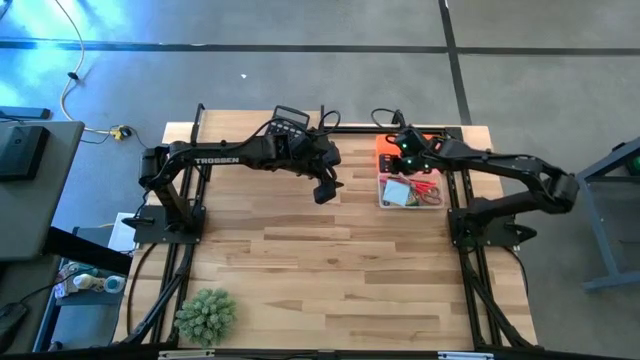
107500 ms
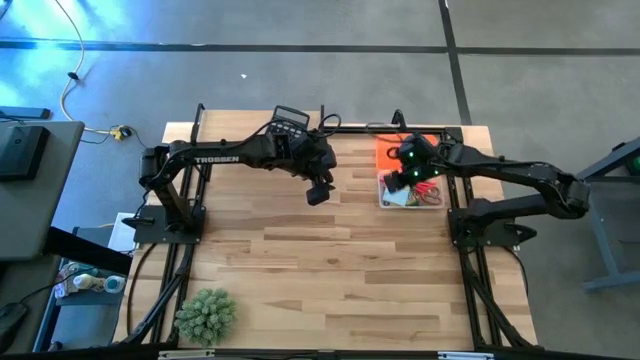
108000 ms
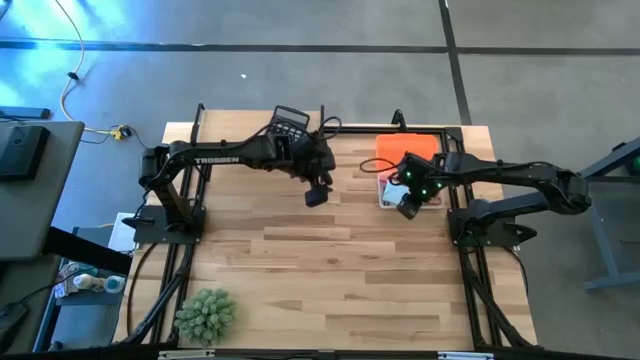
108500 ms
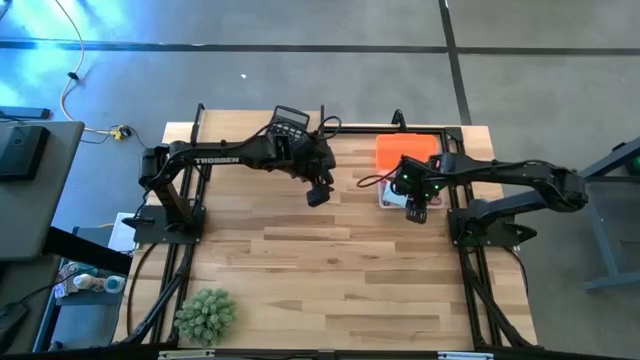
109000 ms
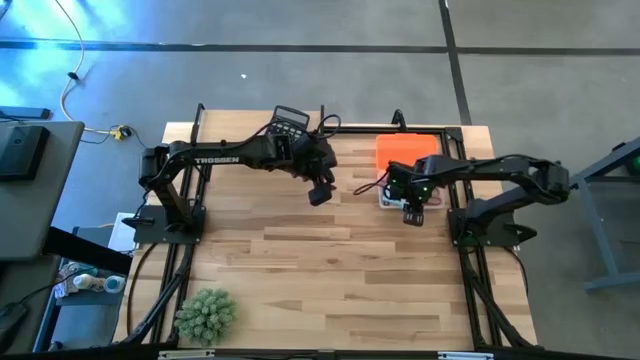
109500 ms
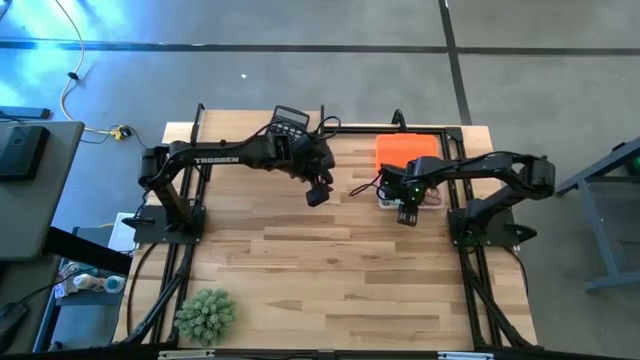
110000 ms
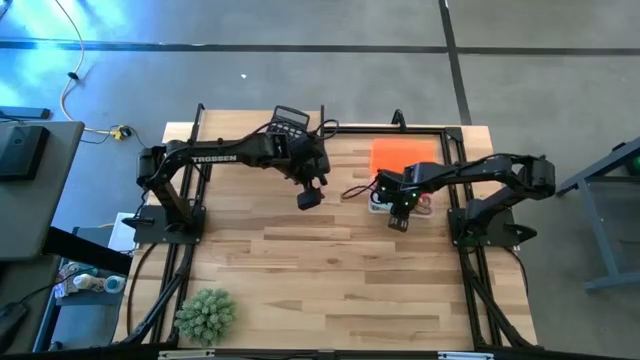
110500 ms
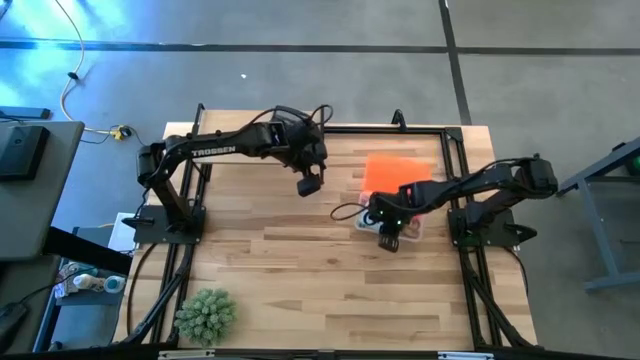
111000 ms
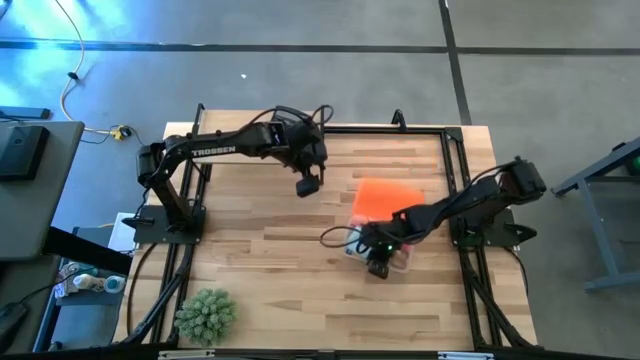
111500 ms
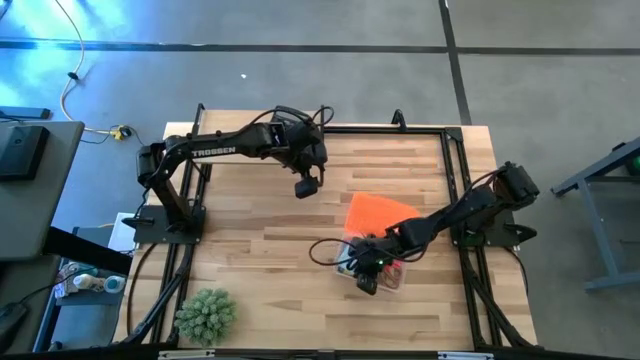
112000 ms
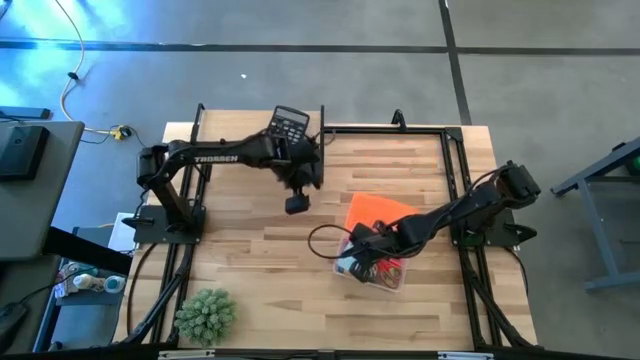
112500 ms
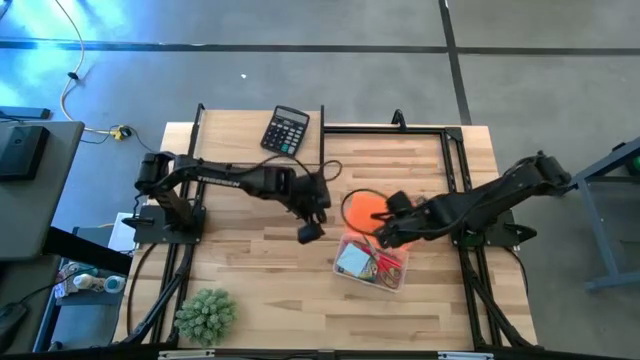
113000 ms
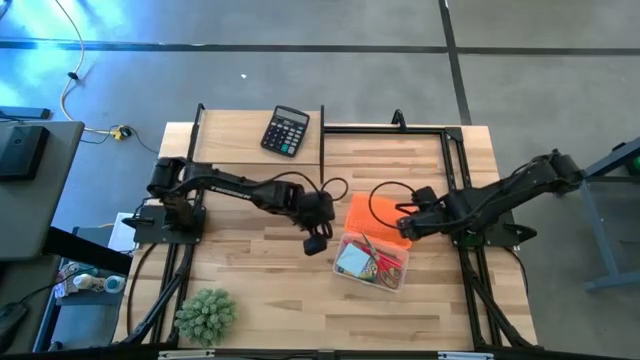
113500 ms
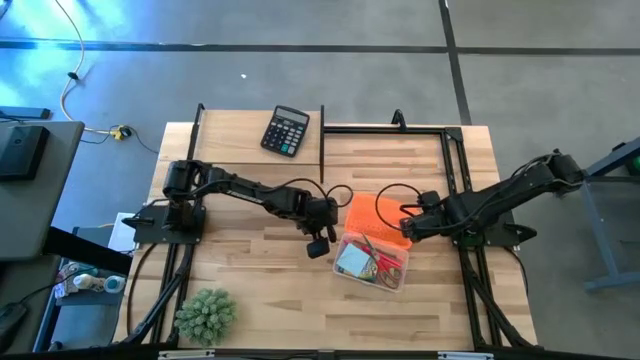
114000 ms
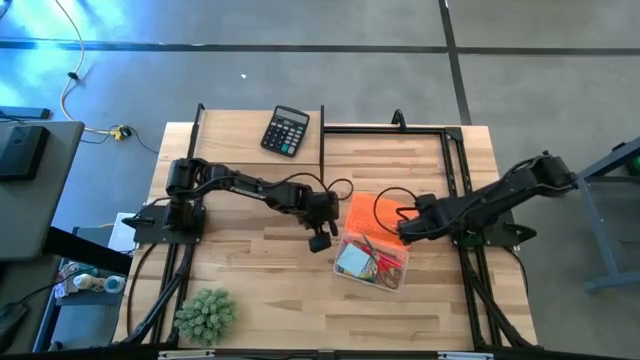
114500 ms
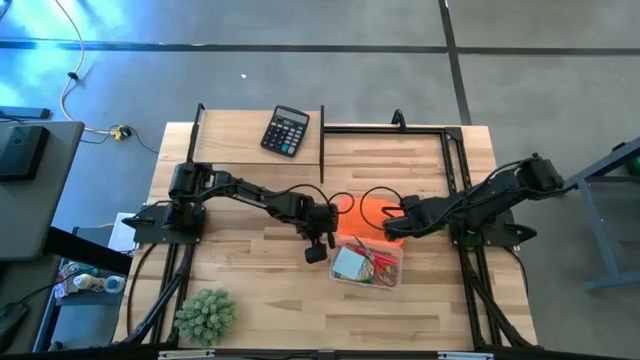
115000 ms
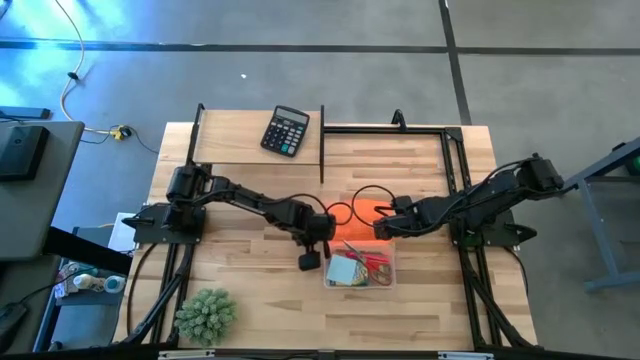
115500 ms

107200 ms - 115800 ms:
Task: Pack school essentials
Move the orange supply box to the center of the table

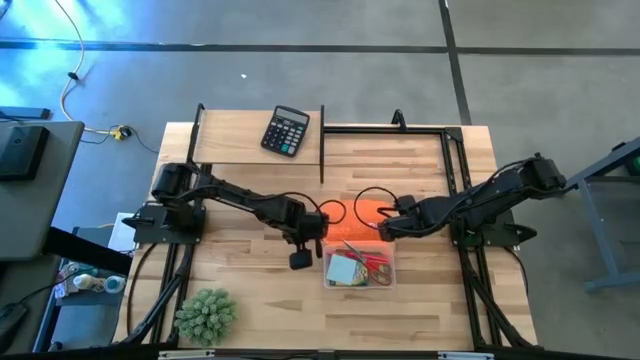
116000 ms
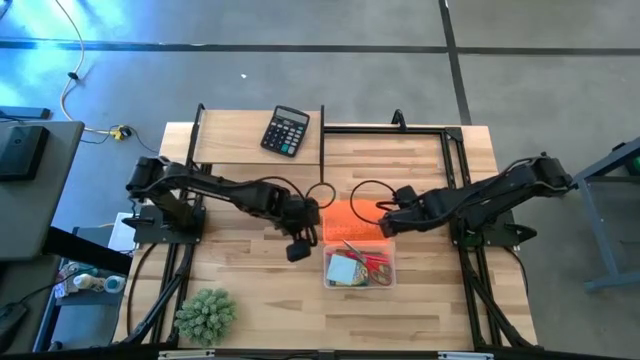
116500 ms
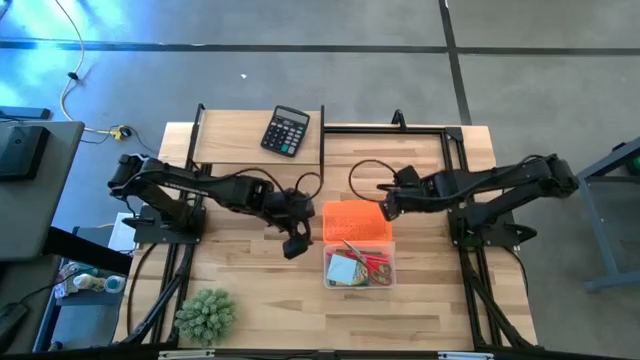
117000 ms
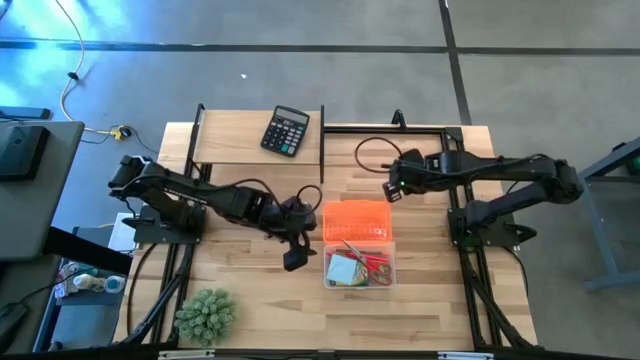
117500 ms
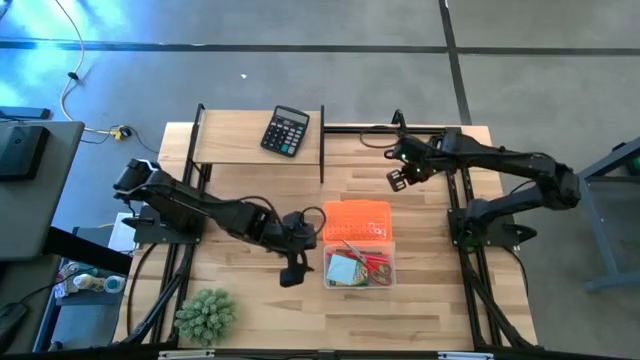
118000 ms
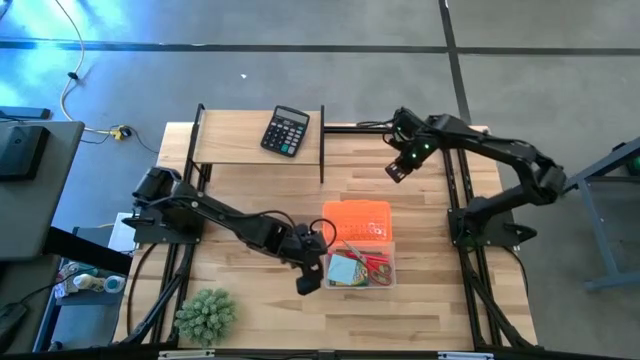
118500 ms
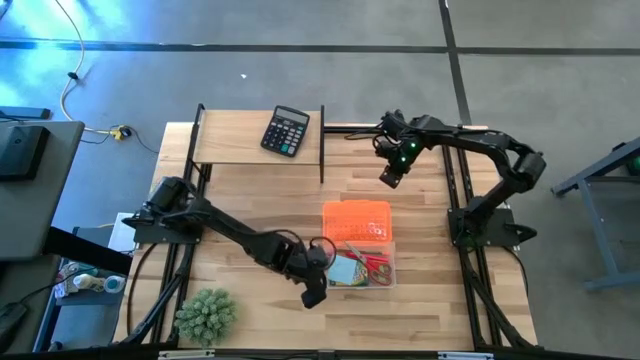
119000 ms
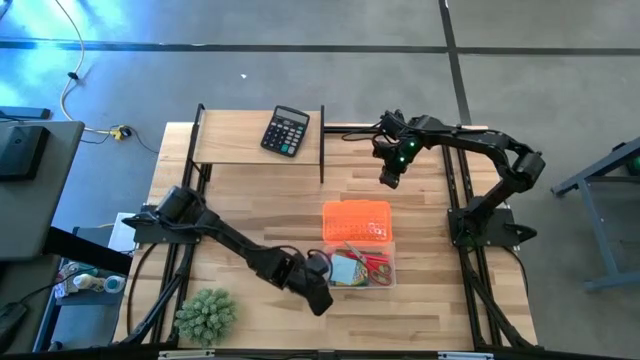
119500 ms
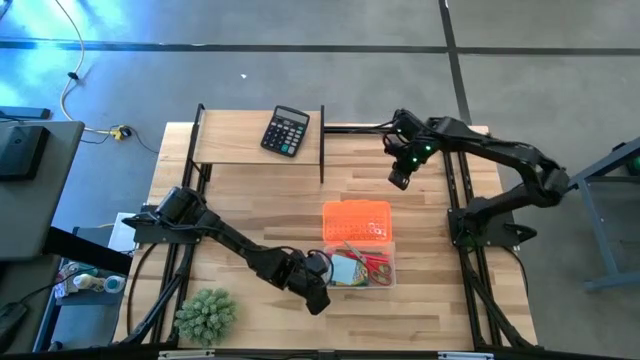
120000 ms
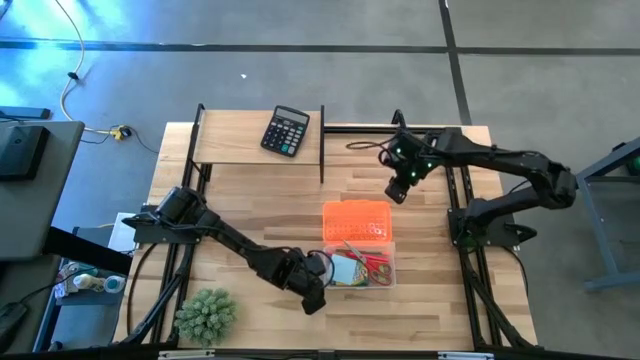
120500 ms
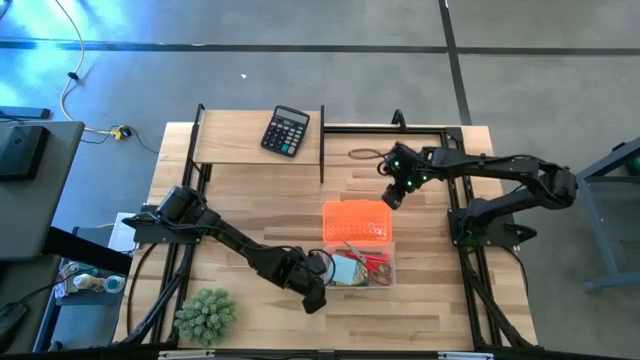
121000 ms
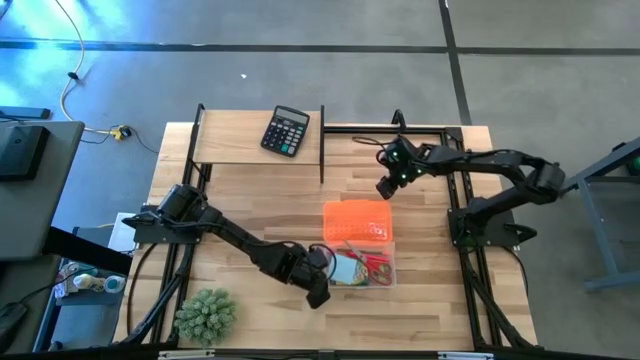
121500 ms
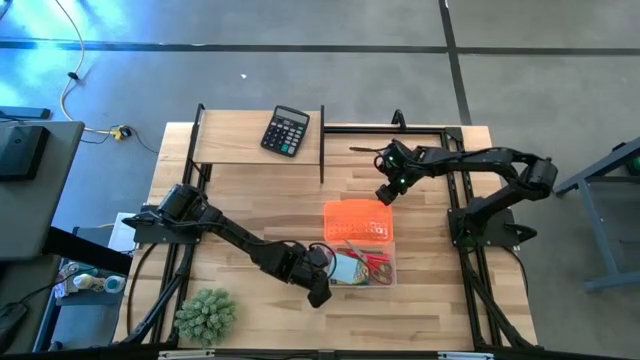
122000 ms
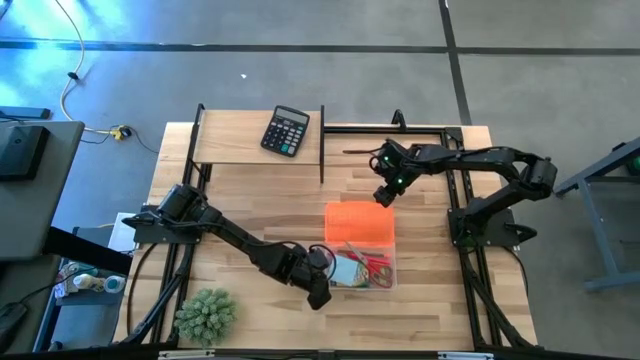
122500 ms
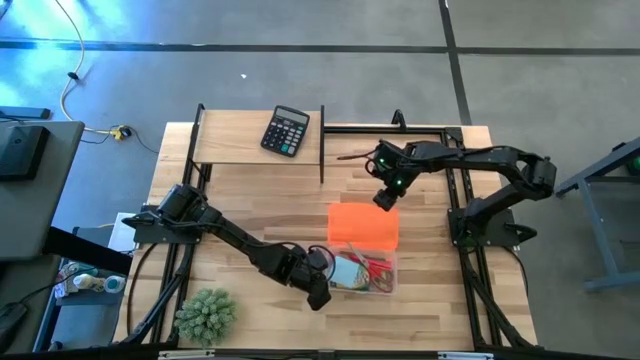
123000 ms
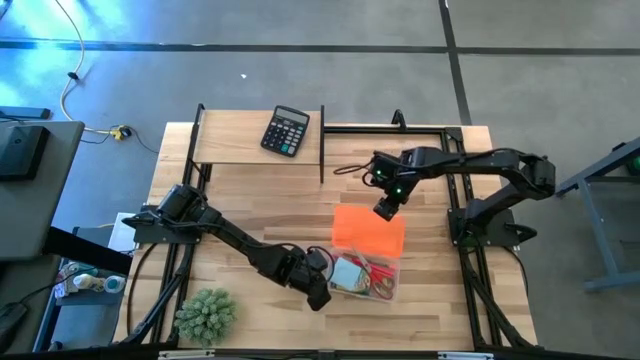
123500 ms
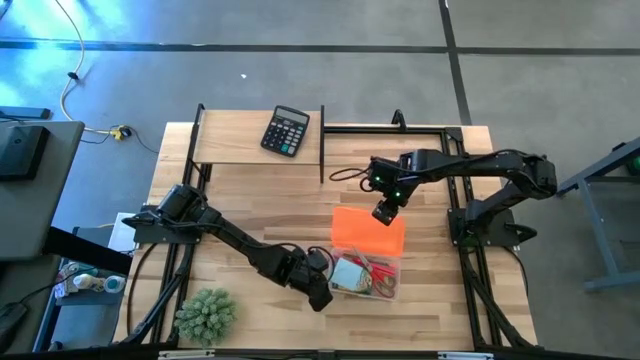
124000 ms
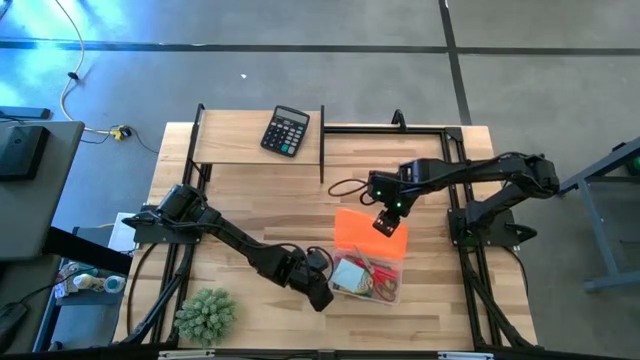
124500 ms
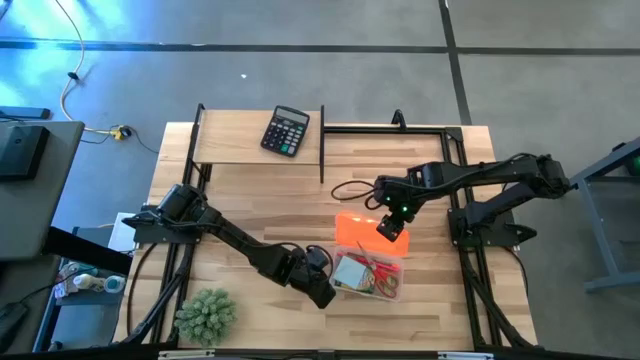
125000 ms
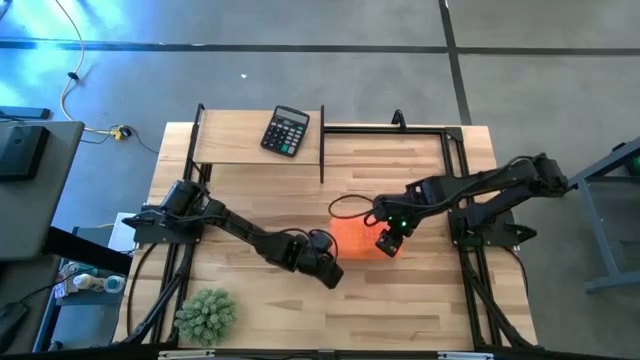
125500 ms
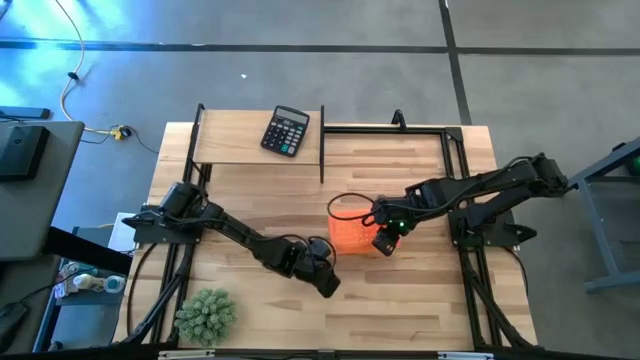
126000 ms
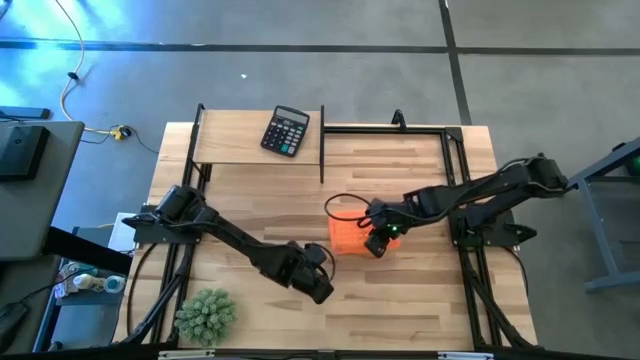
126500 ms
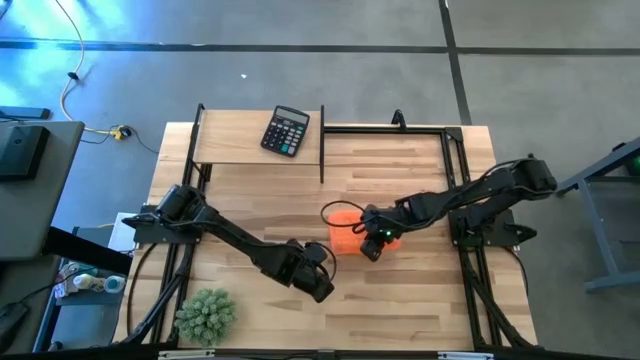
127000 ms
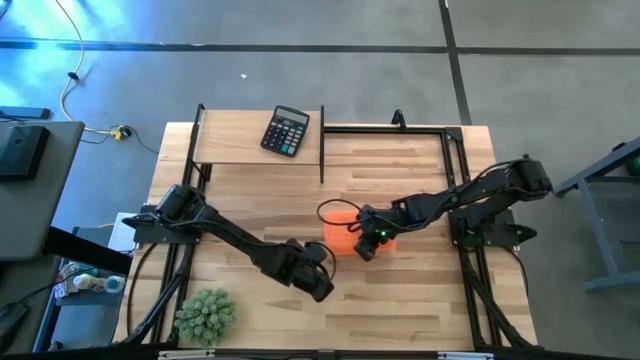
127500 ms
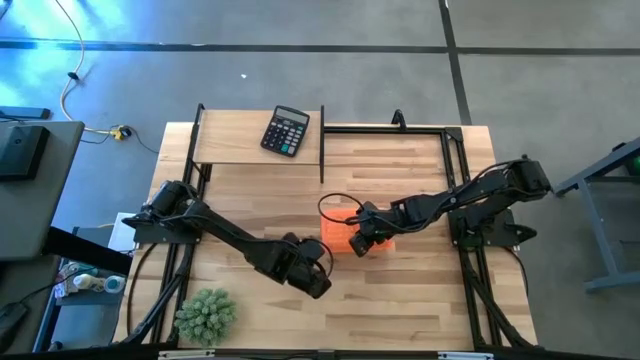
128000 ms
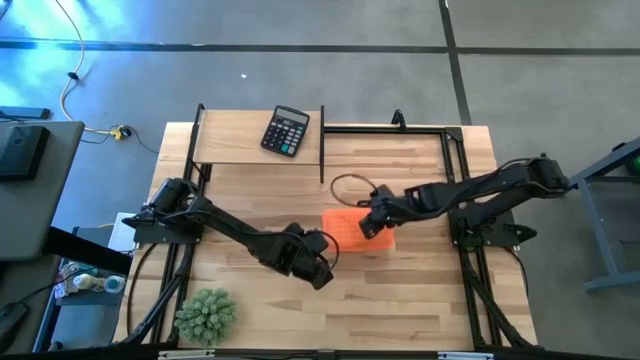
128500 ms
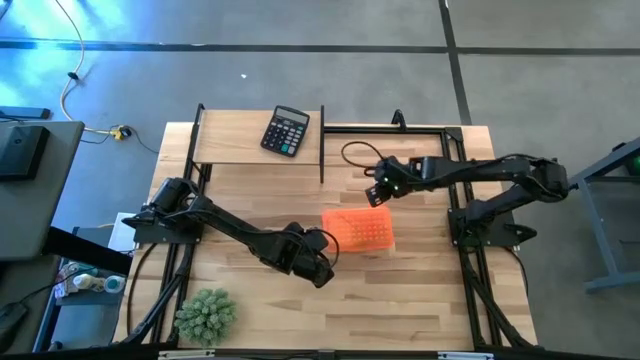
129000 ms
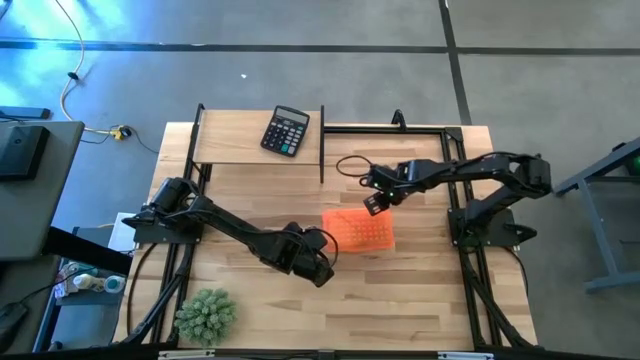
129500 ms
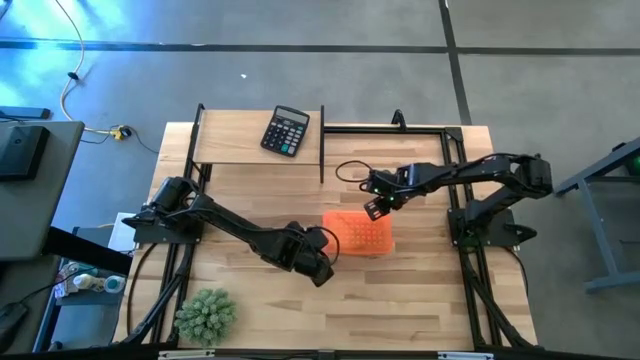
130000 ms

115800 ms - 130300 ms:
Close the orange supply box
